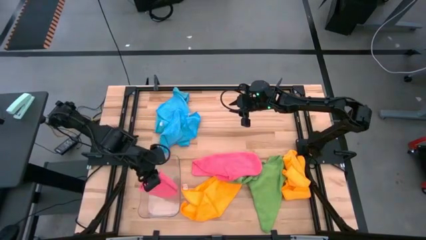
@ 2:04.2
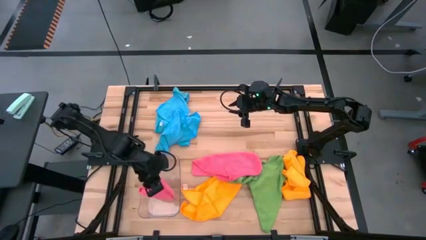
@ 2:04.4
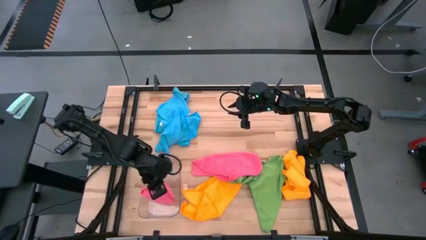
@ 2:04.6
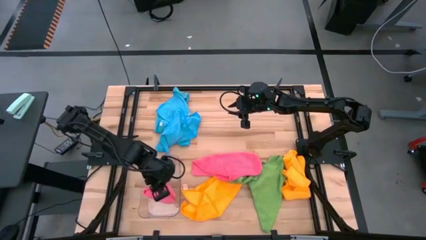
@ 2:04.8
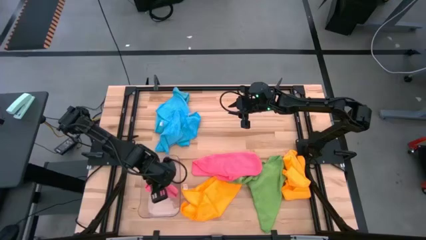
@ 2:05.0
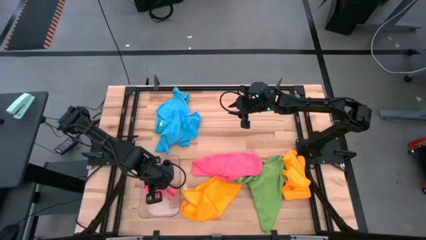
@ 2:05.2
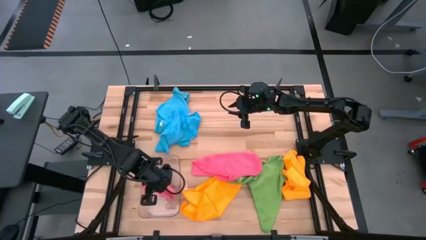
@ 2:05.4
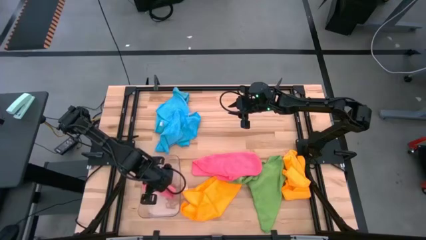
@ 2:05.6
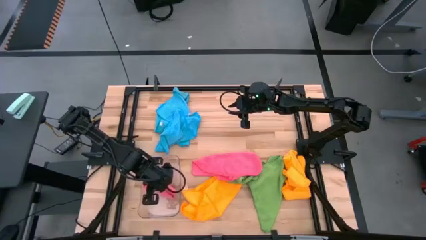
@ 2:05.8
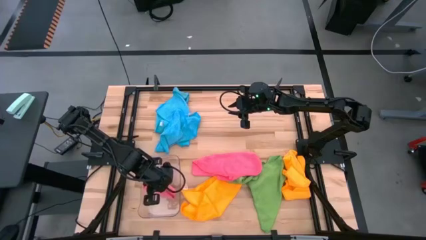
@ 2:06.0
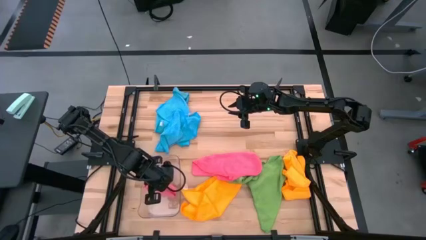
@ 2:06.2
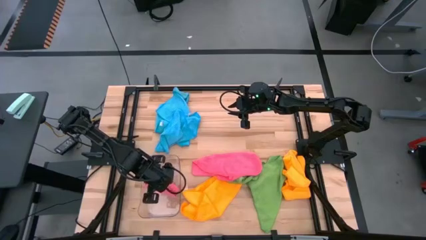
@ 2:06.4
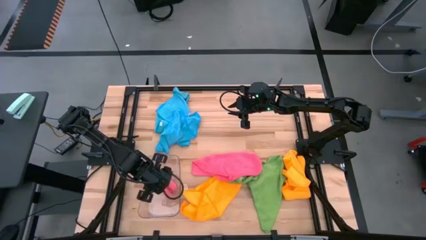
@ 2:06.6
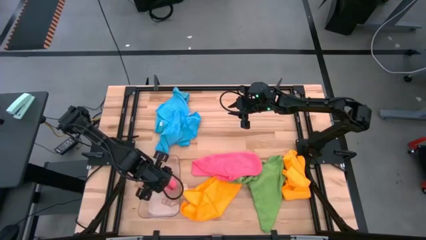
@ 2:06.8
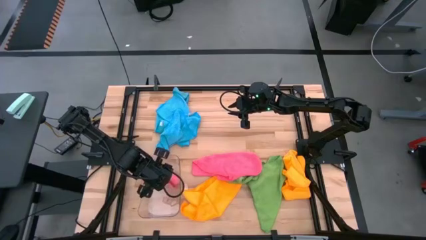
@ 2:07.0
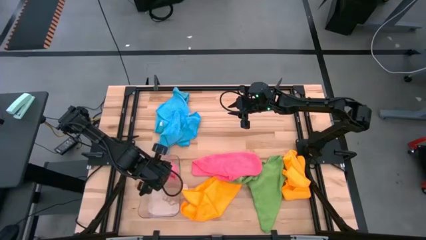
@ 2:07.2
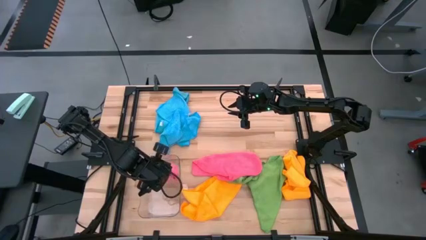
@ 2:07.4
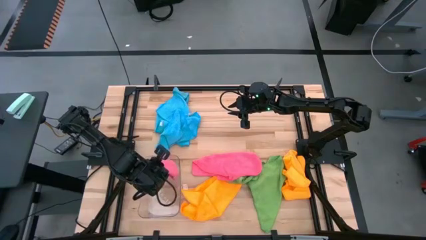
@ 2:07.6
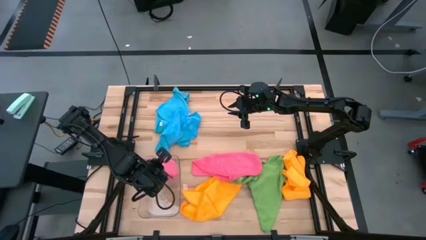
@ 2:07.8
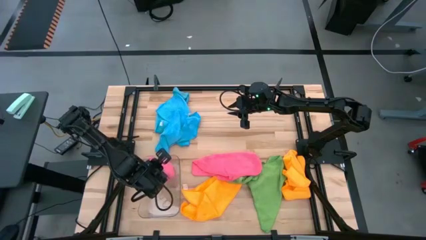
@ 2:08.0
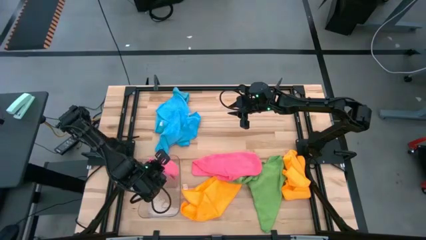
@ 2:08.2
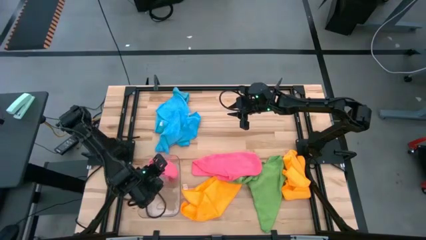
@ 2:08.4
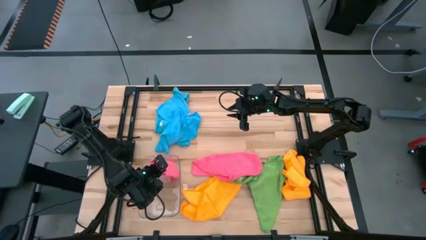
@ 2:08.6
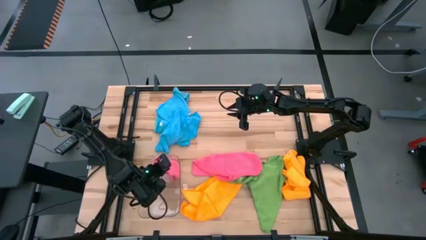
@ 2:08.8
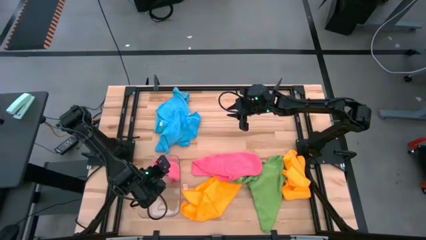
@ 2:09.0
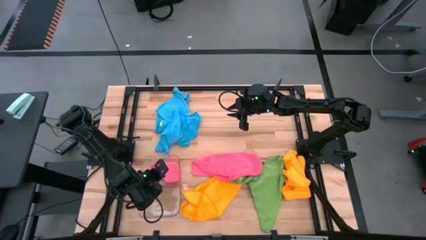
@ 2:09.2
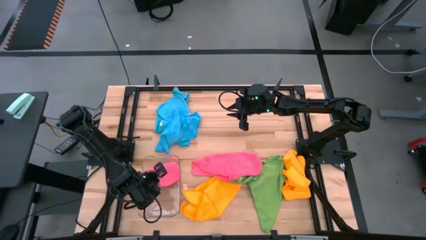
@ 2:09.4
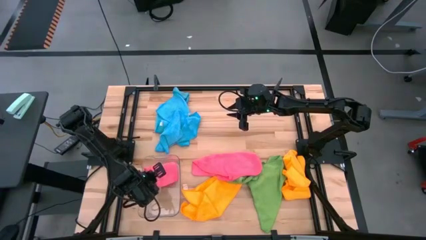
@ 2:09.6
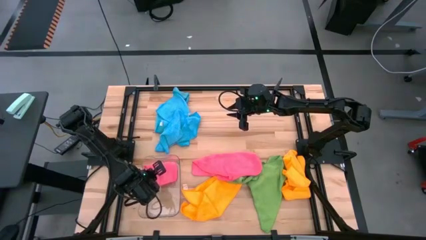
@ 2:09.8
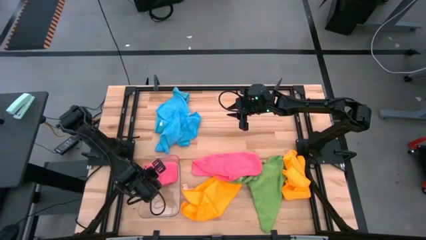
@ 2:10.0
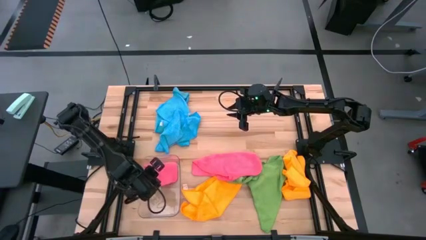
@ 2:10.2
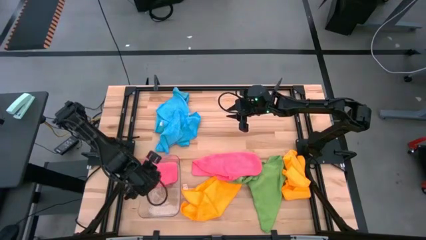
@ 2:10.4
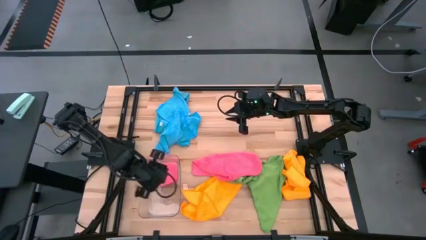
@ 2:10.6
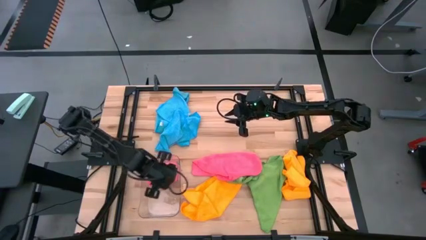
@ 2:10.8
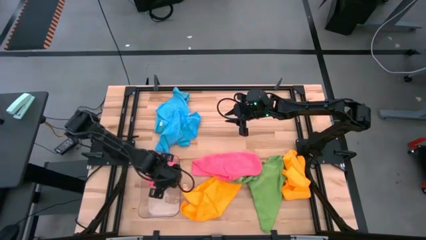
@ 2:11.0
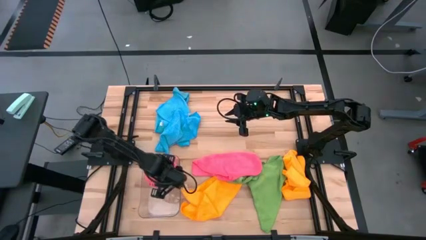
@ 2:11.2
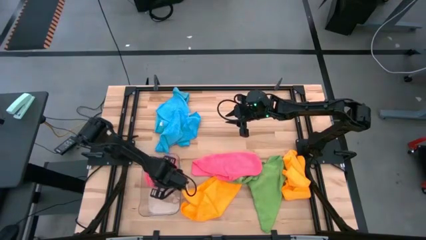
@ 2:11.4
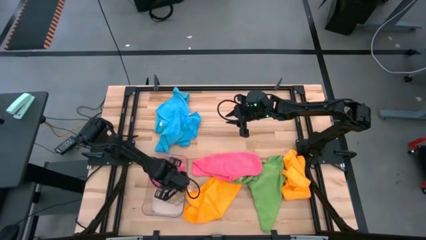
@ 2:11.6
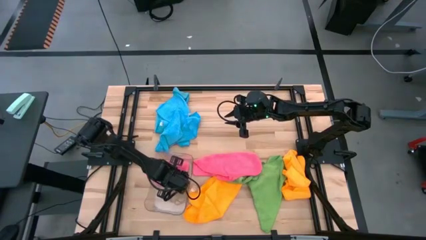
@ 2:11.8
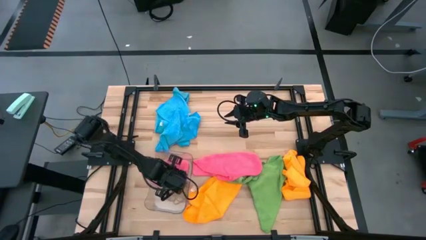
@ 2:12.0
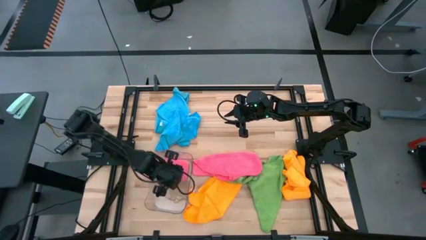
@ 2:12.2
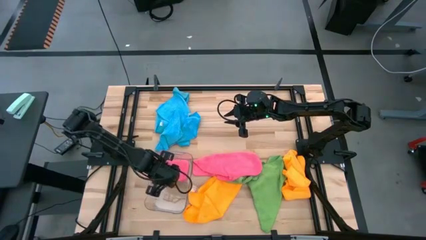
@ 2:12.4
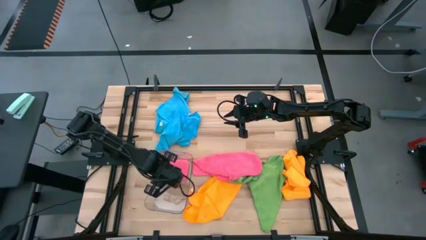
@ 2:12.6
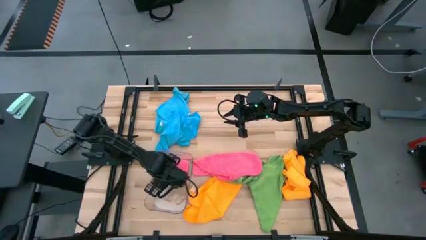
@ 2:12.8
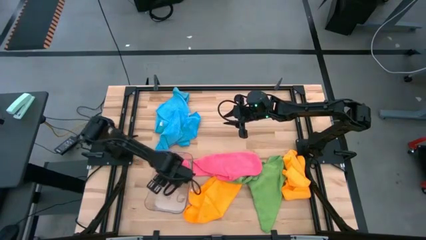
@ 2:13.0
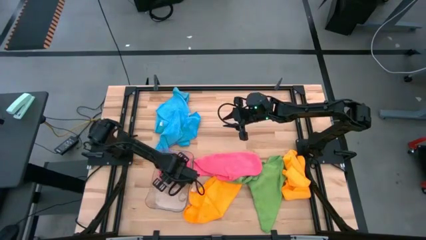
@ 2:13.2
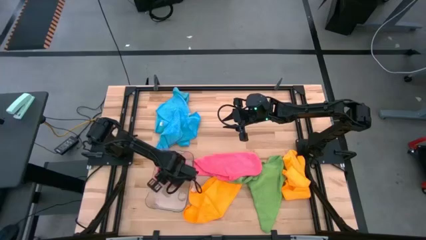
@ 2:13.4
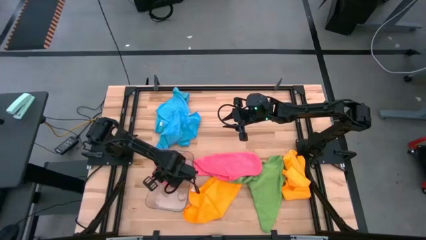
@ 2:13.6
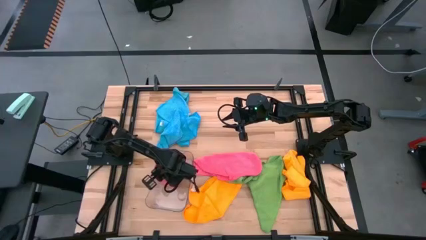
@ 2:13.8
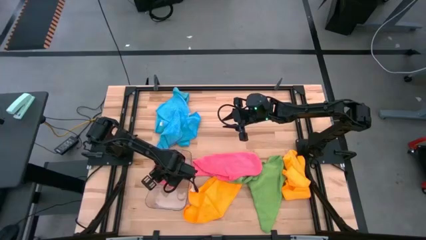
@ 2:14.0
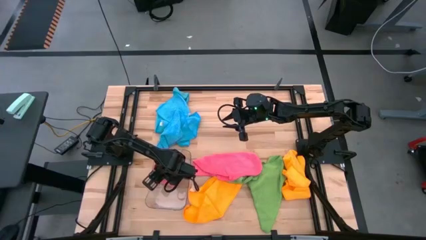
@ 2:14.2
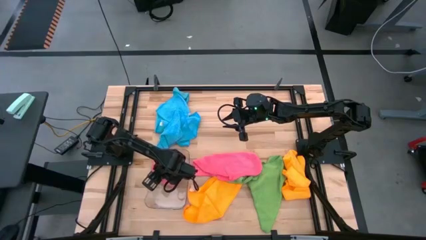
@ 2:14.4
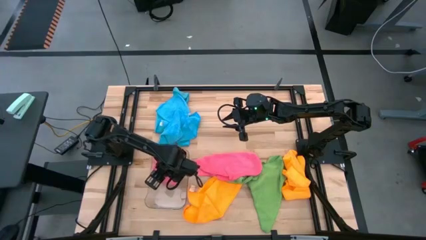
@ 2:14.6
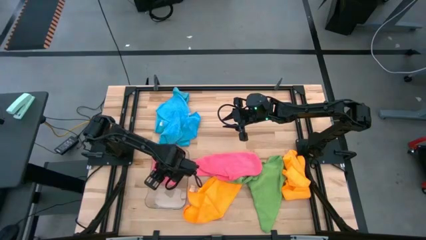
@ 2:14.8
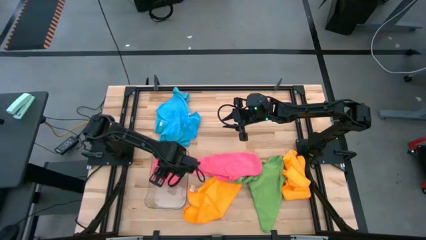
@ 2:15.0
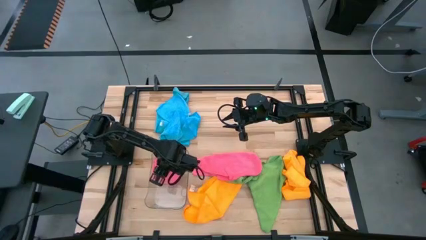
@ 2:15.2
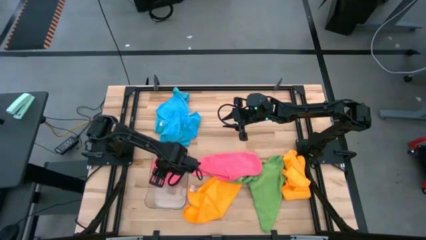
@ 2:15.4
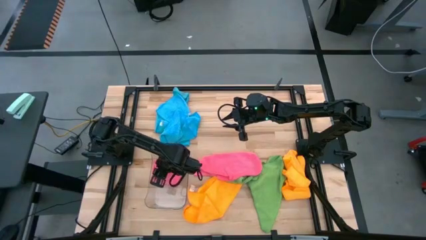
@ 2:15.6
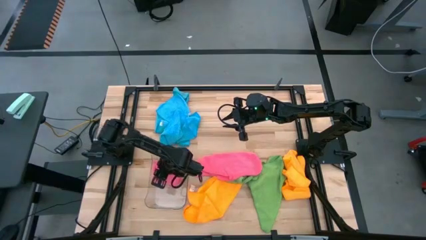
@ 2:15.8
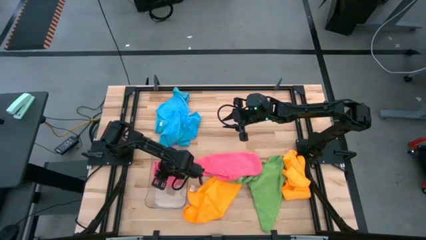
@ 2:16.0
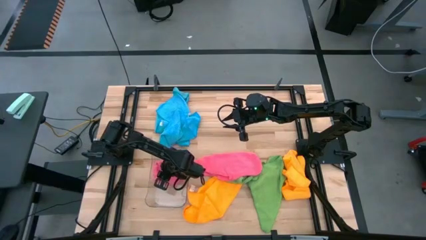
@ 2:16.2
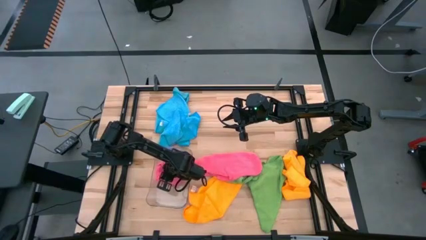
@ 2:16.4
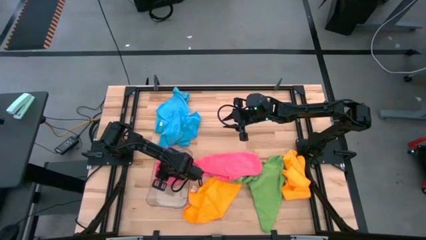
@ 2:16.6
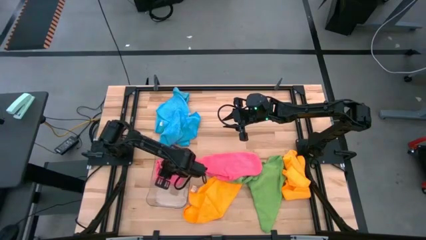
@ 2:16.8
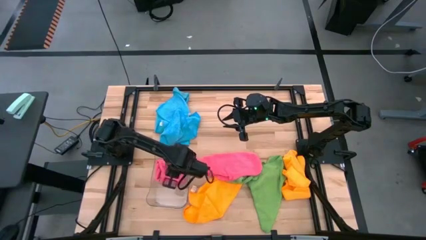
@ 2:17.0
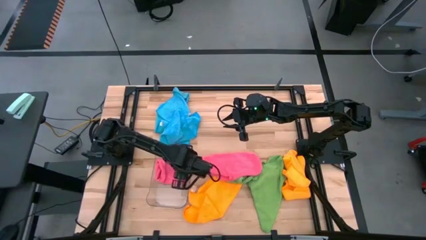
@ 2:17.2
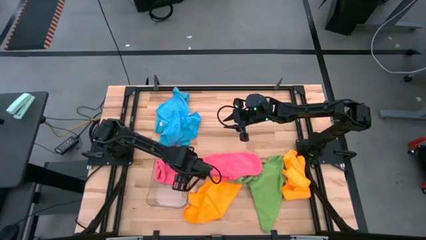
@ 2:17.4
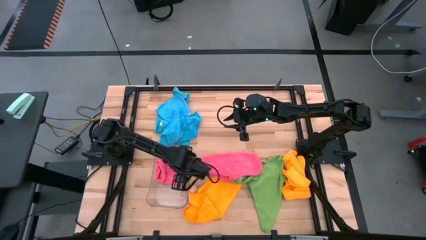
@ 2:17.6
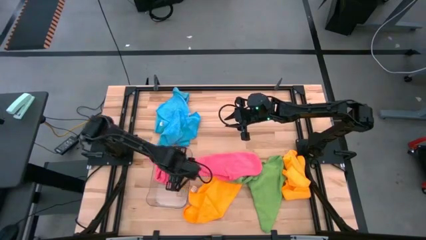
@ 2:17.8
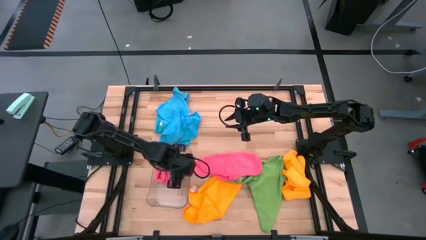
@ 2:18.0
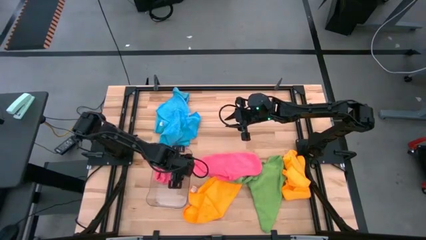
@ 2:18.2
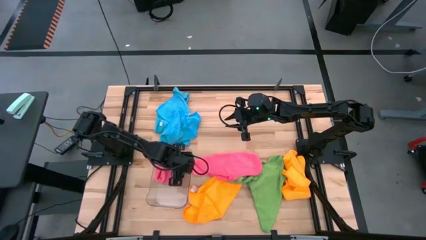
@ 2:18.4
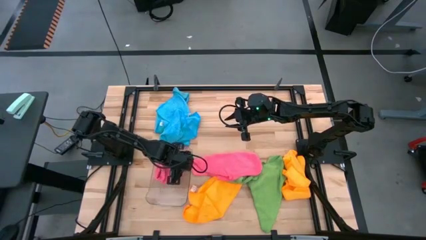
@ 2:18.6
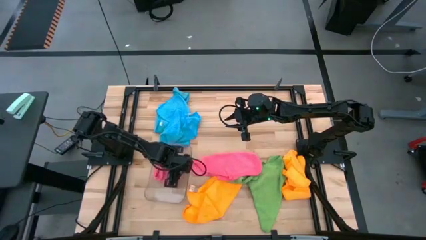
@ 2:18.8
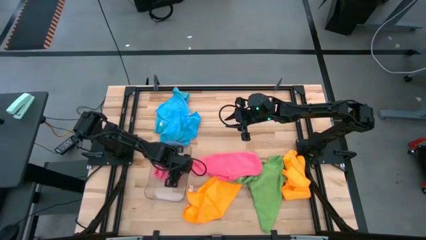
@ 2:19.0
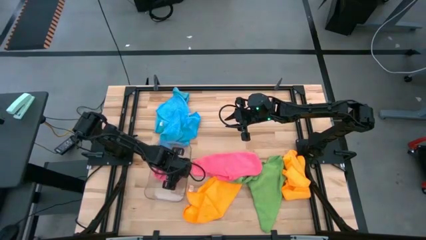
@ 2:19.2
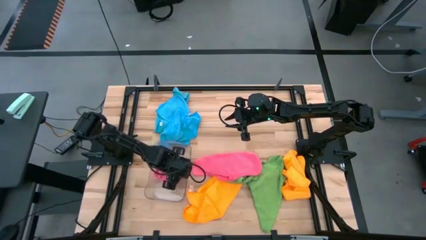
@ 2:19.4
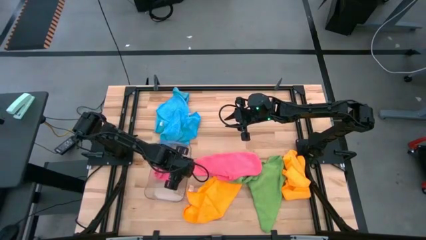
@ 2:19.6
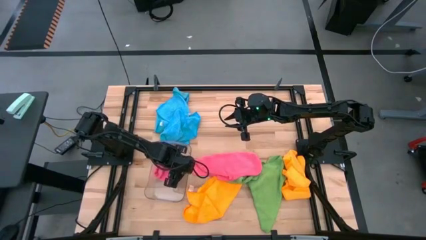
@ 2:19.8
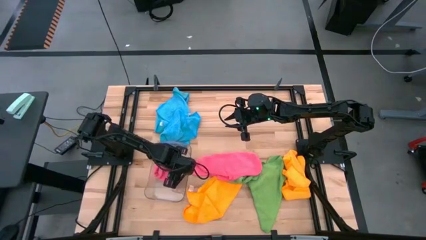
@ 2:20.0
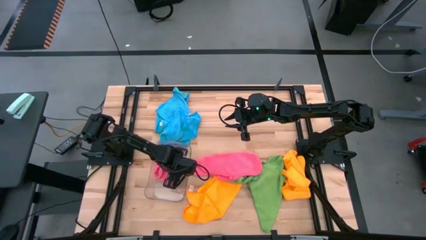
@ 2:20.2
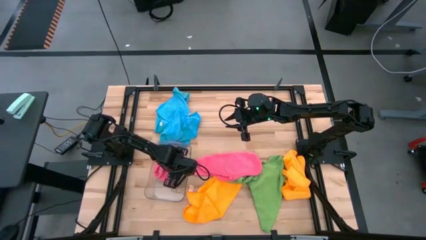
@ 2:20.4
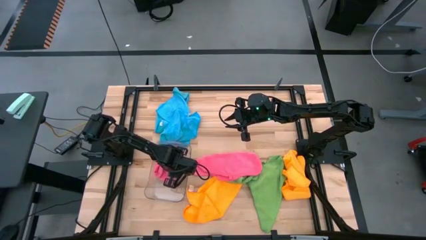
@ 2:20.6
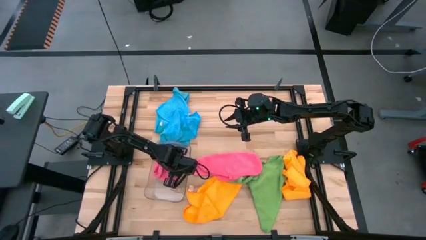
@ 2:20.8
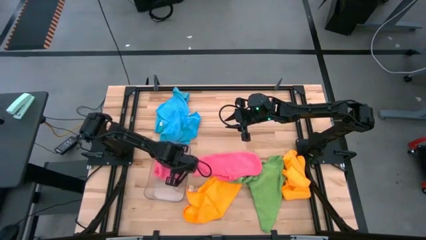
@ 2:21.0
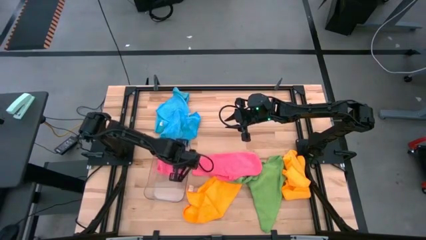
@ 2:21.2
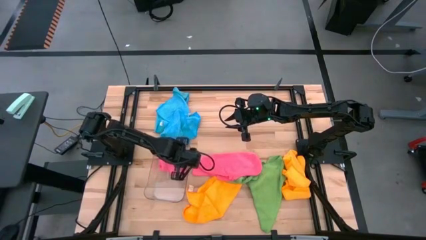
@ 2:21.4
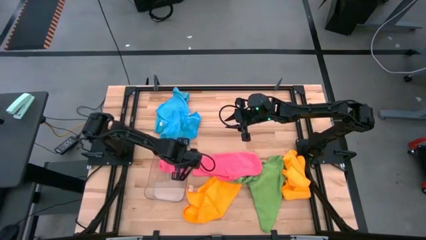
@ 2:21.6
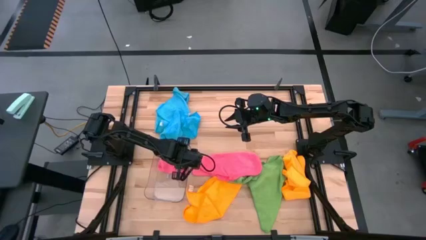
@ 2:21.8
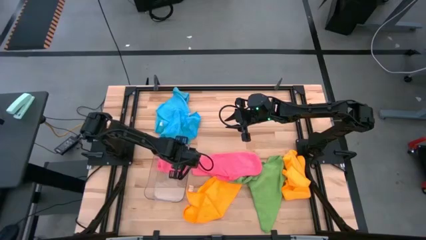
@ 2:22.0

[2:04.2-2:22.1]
Task: Fold microfiber towels
Put the top pink microfiber cloth into the transparent bin
